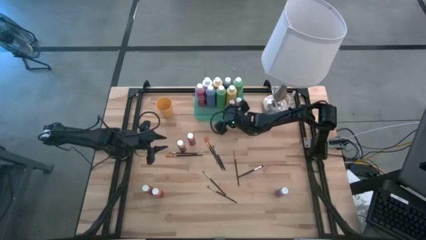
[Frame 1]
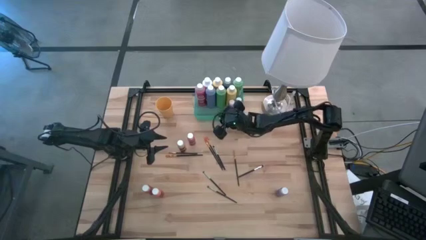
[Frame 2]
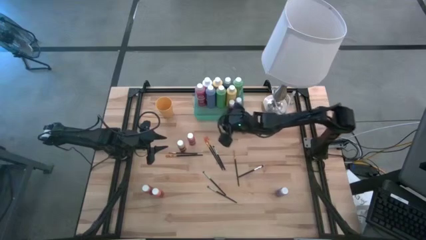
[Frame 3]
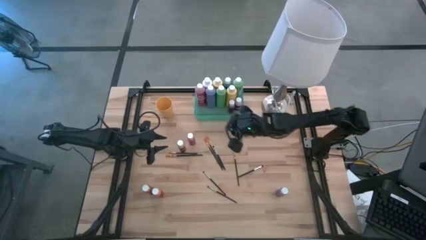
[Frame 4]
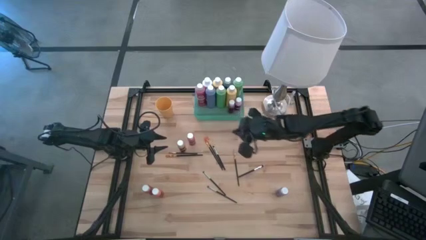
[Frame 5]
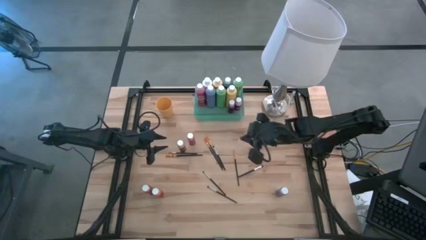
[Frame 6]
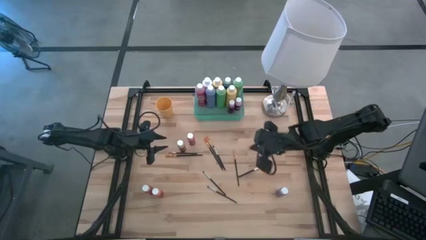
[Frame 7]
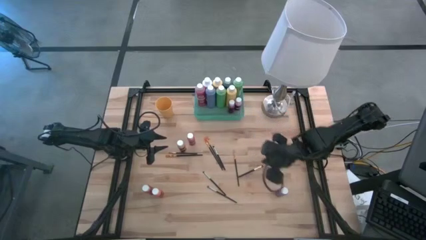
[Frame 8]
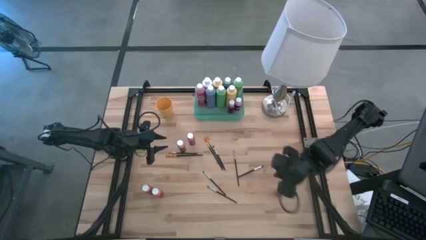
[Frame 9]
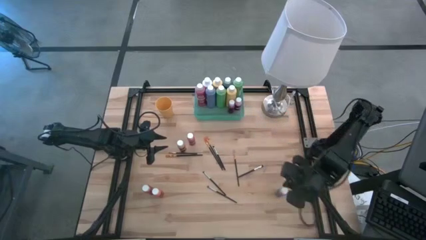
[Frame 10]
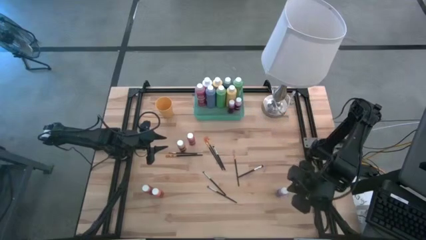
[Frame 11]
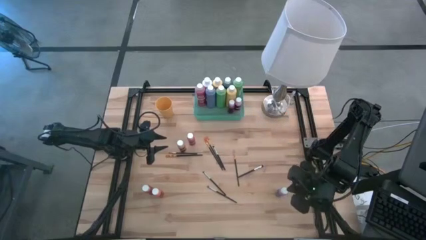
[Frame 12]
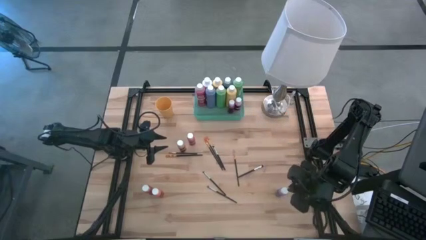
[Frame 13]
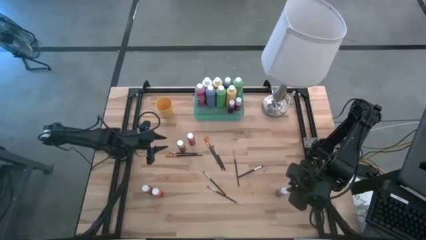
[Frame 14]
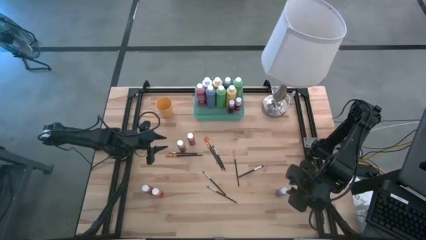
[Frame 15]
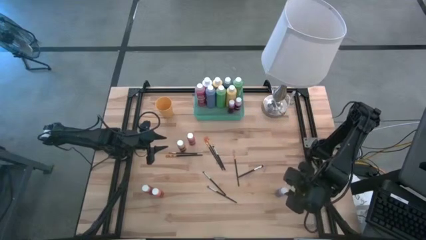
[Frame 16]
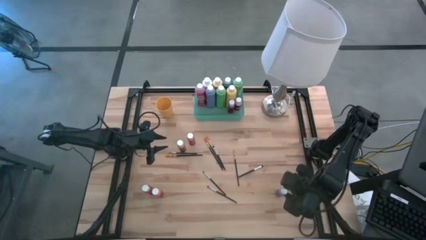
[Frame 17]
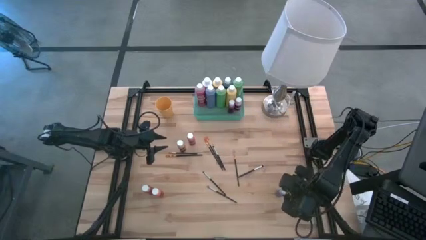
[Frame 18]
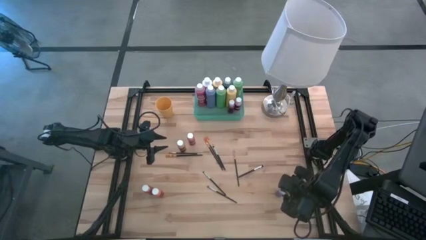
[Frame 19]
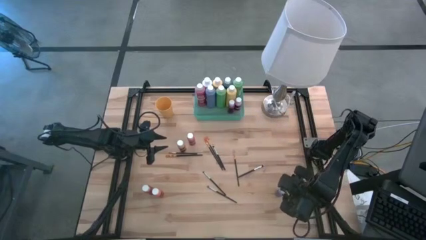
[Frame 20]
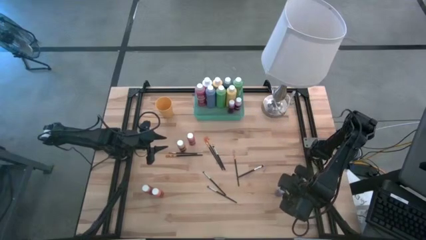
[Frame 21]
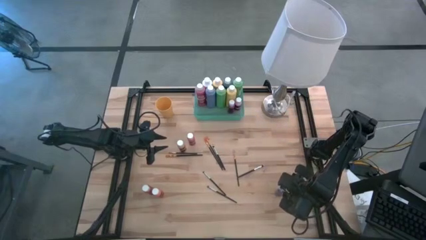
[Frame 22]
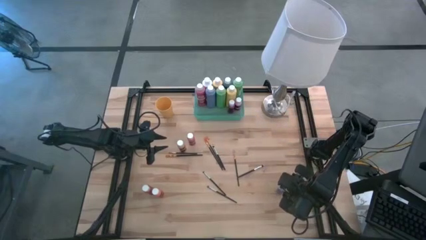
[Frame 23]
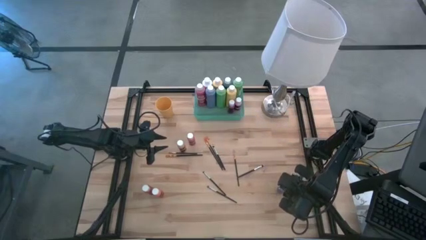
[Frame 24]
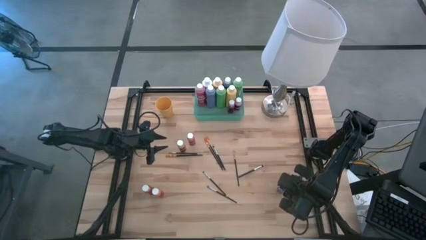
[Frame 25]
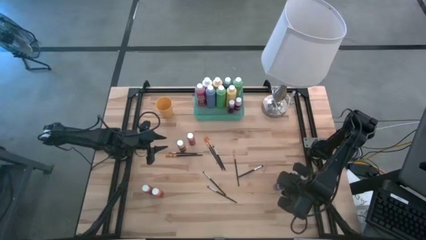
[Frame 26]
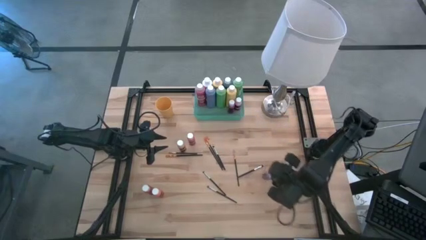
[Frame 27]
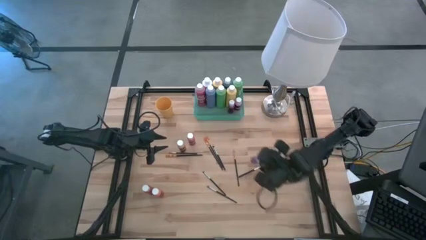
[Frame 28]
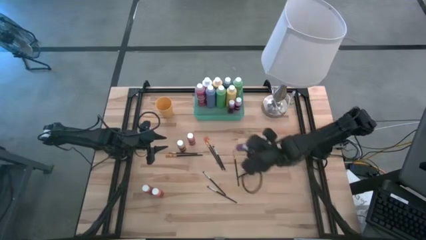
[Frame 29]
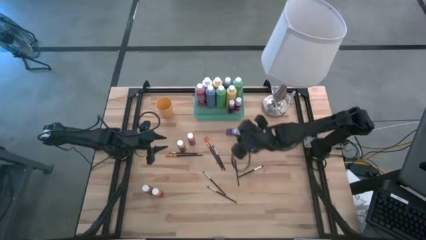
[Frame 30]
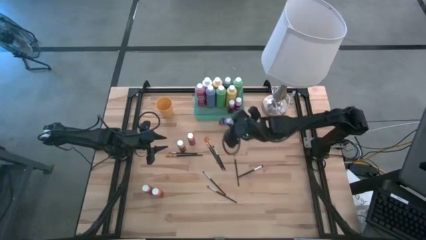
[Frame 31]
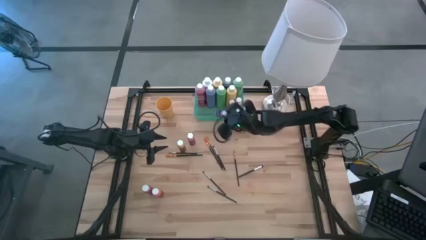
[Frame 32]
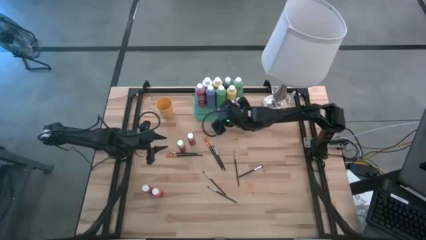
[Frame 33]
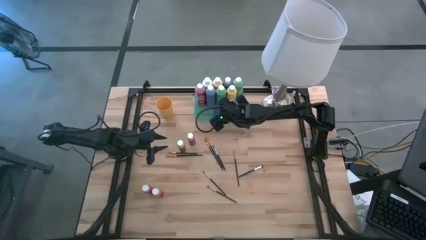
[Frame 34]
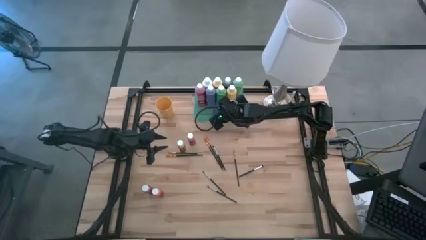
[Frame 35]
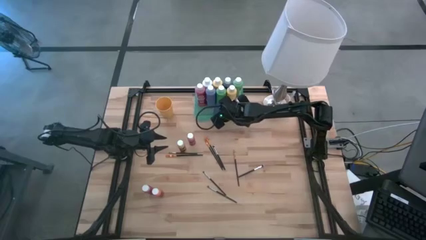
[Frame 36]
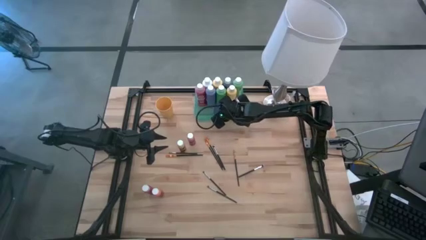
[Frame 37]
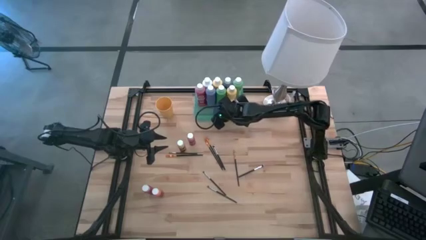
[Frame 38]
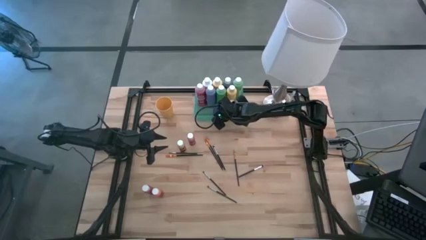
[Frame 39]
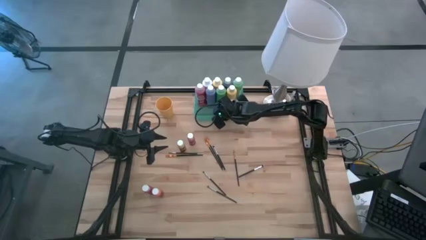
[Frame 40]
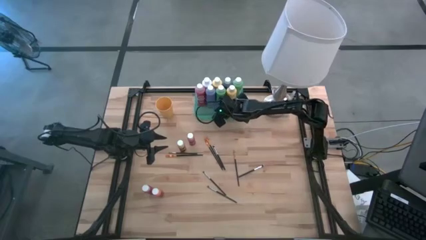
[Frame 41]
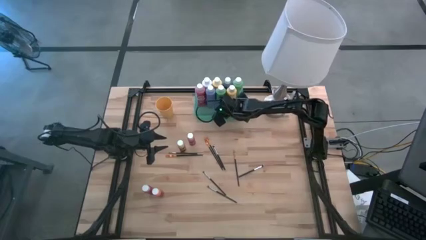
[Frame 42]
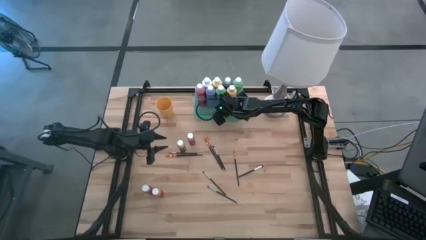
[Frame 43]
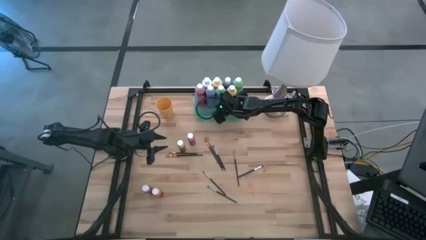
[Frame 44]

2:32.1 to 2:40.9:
Task: Pick & Place Paint Supplies
Put the small purple paint bottle into the green bin

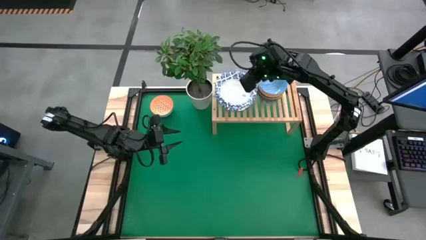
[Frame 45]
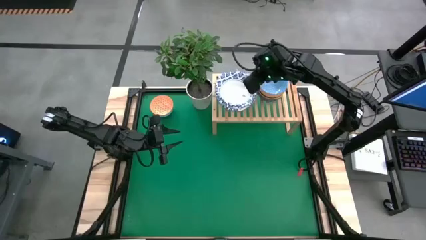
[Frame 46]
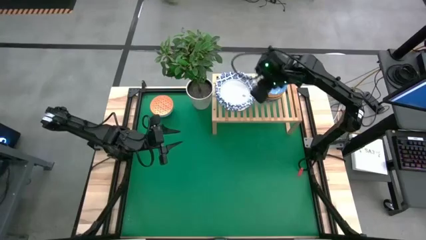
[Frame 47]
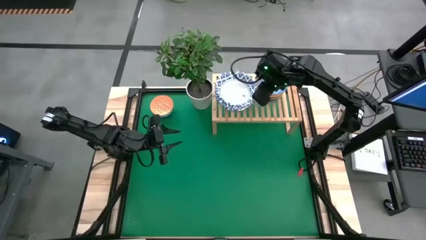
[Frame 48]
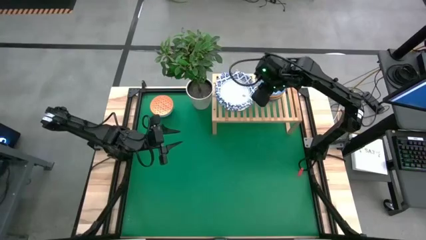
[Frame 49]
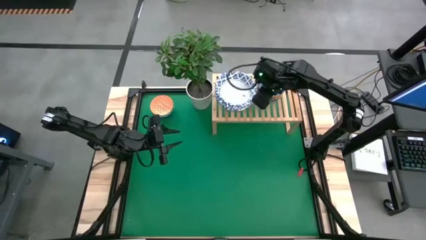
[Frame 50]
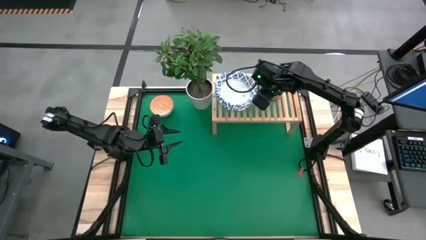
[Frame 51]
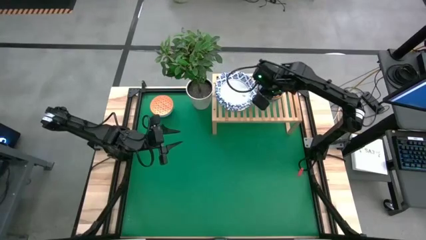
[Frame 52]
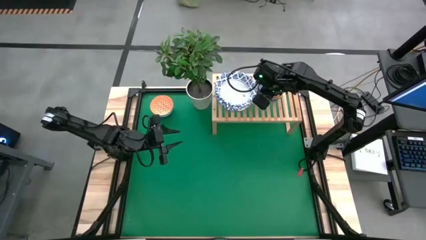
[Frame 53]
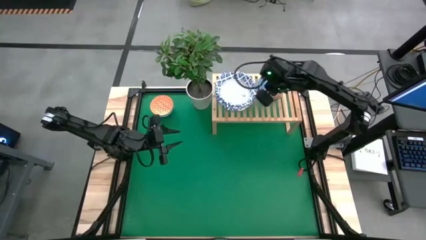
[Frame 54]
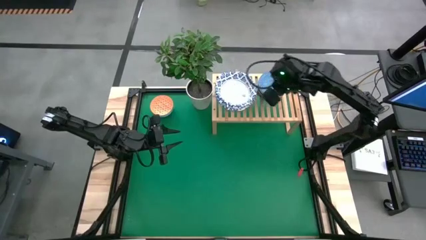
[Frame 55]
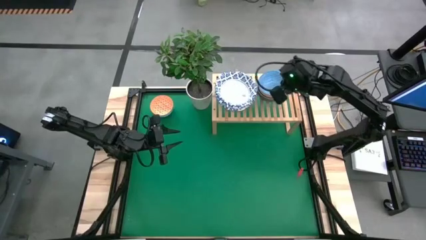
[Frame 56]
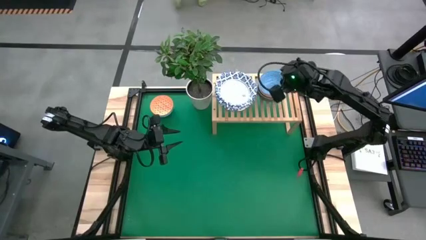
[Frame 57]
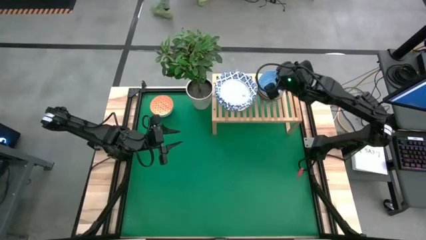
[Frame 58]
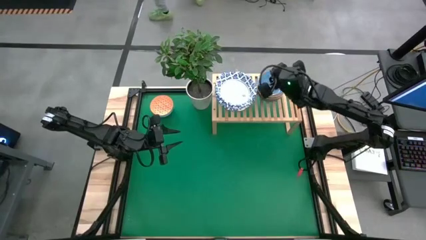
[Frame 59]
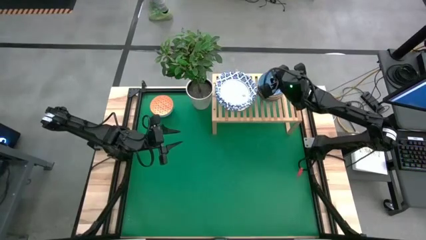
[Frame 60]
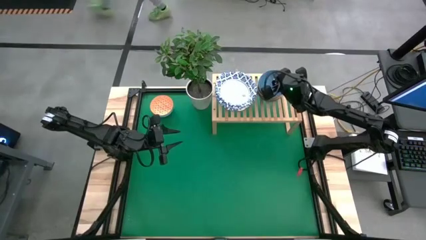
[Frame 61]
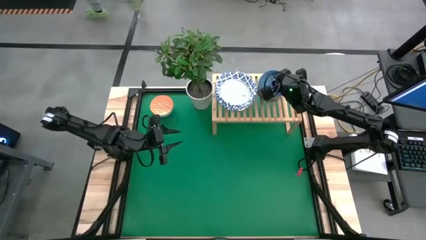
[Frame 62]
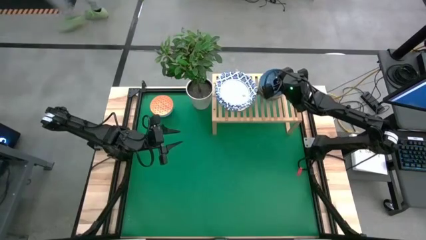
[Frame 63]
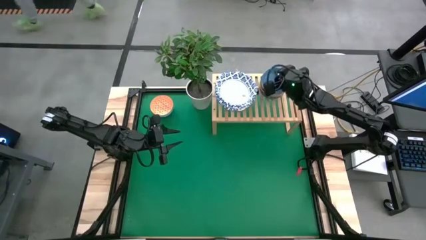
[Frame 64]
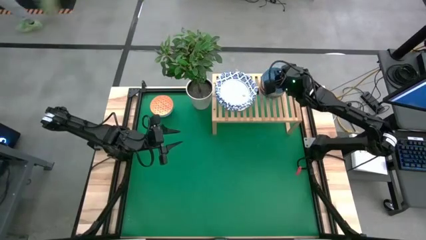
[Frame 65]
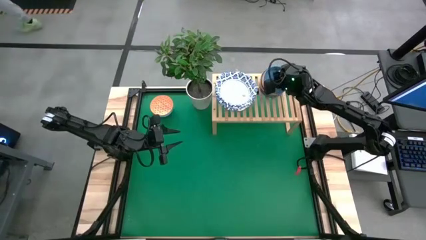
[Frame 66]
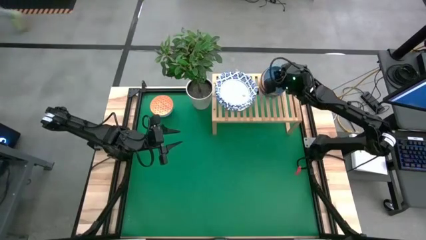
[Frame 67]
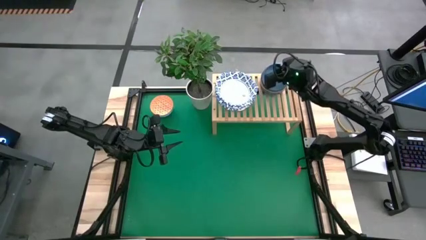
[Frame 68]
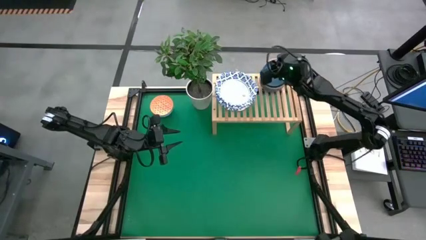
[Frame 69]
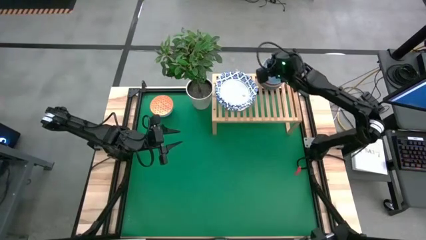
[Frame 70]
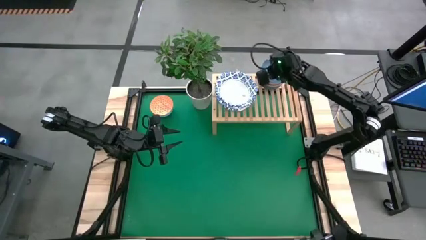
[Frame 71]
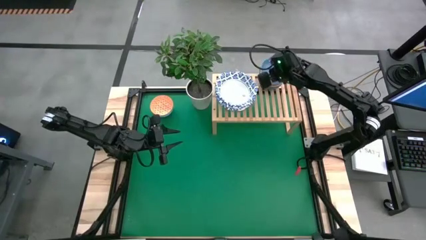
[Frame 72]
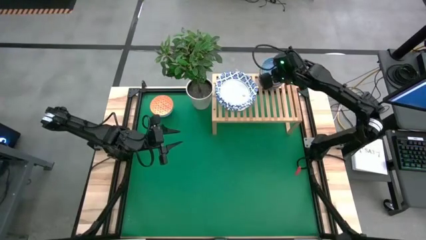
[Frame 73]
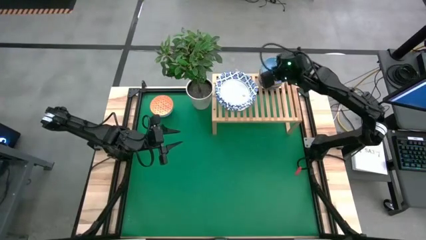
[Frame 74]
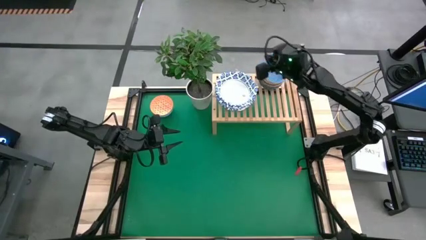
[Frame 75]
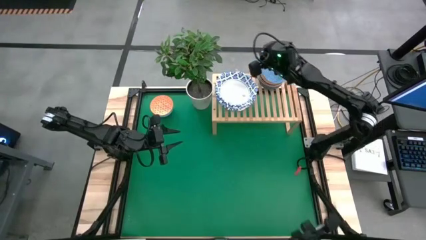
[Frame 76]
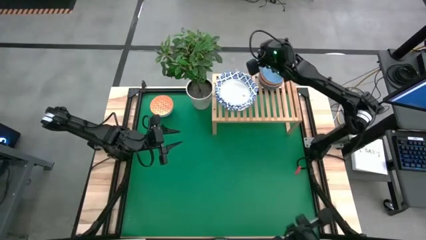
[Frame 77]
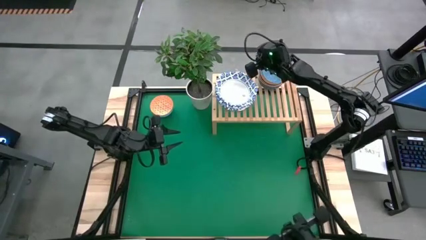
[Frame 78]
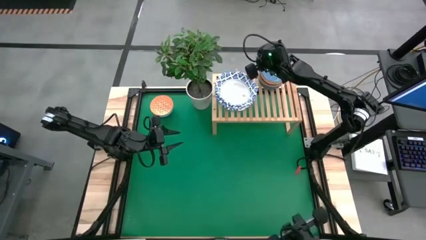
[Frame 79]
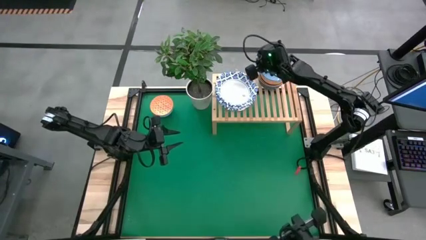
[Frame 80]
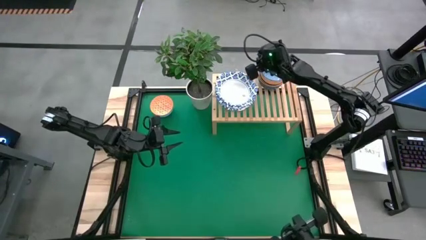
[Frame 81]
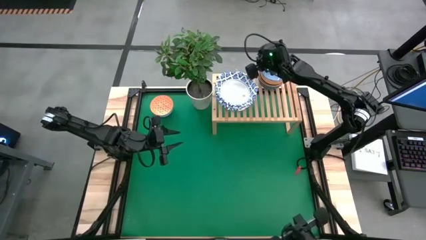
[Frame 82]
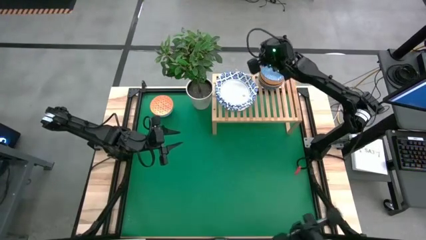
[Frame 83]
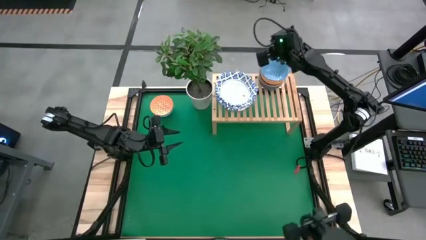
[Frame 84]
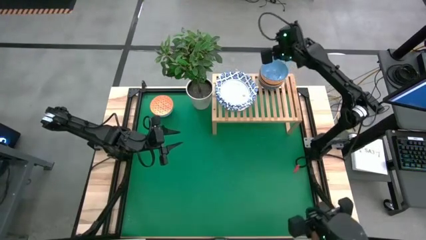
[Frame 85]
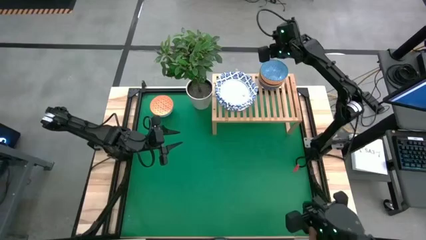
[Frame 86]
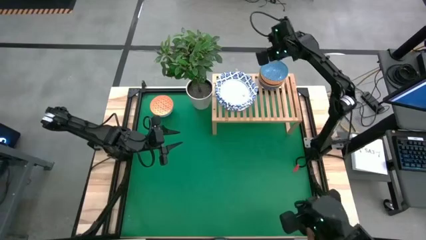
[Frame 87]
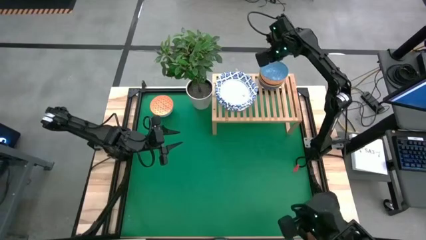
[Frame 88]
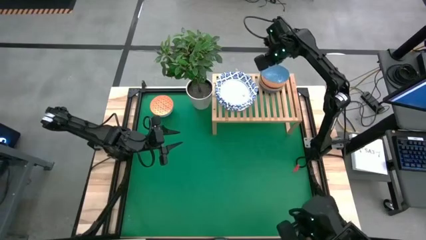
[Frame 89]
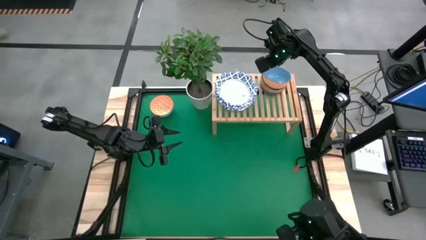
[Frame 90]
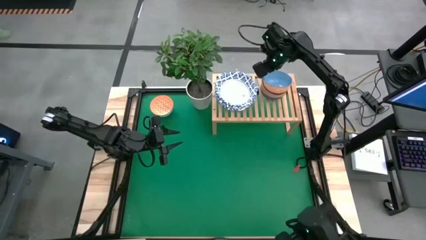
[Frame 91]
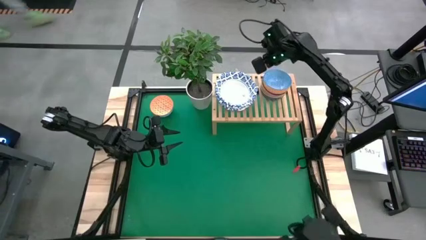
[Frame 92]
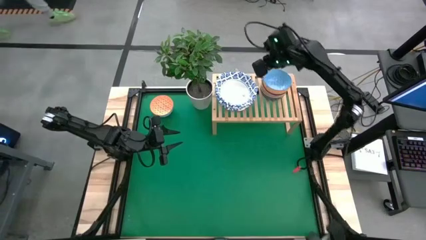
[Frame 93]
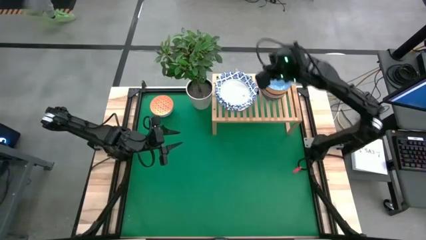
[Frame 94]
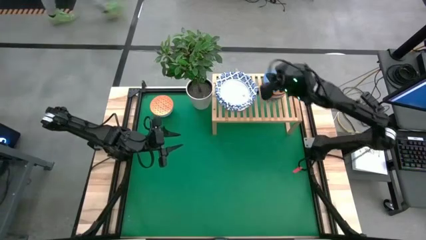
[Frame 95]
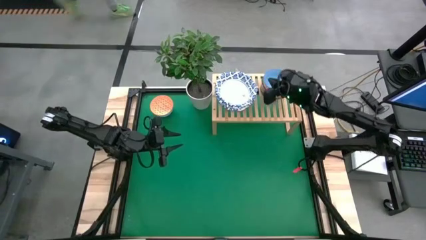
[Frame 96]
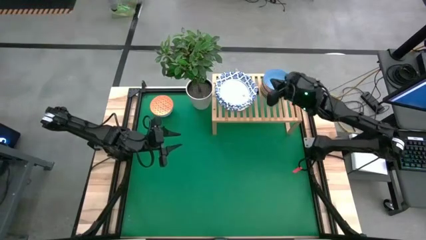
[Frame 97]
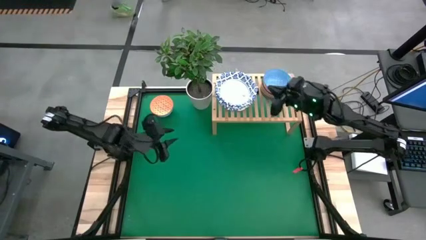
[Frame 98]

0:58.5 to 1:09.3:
Task: Place and stack bowls onto a shelf
Adjust the light blue bowl
